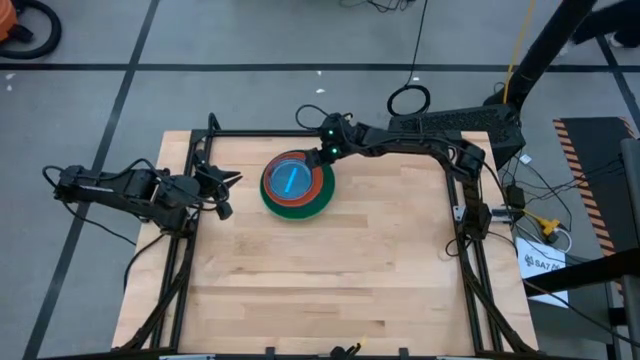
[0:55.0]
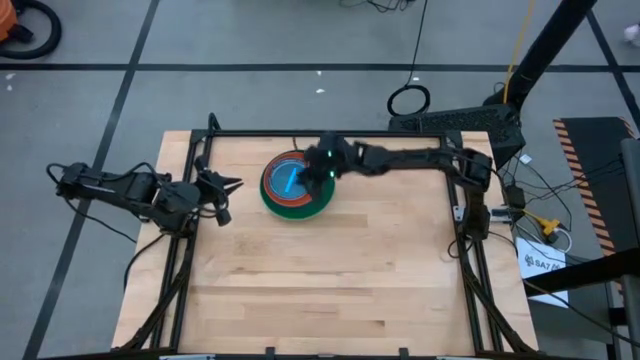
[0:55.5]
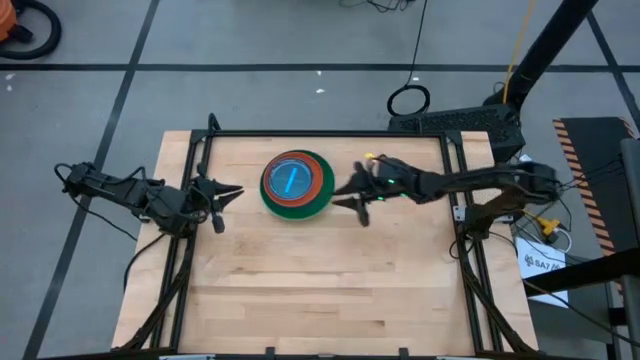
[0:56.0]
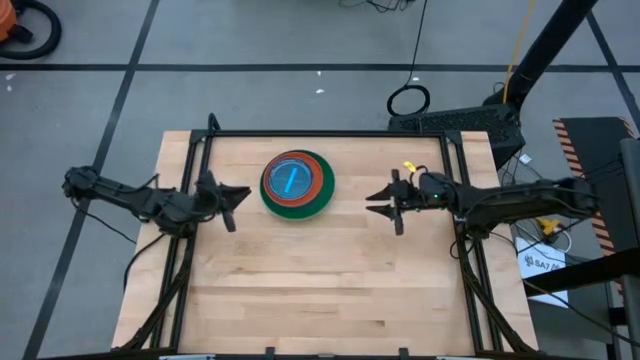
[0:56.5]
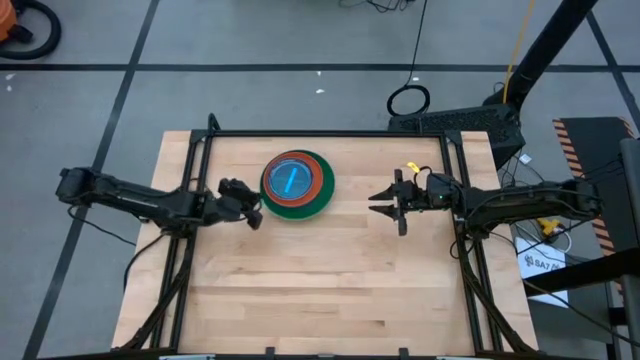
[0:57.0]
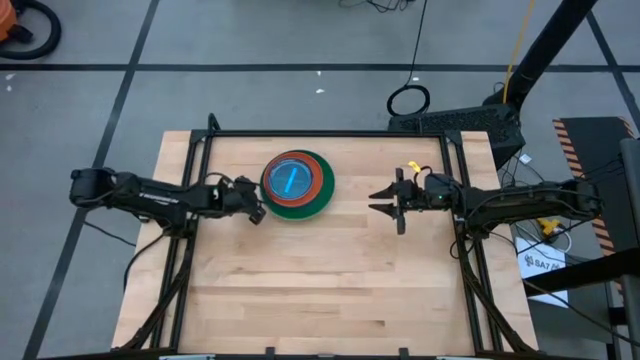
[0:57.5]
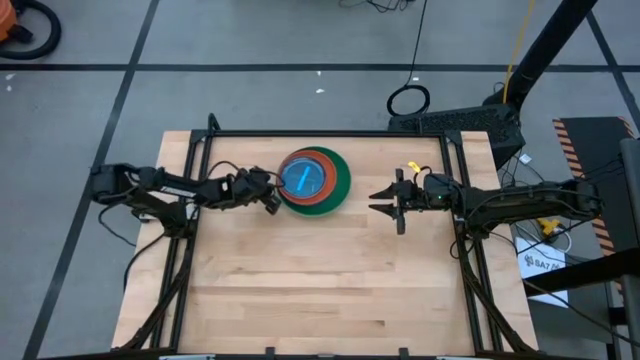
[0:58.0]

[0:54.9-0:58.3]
Task: Stack plastic plates
Adjust the stacked plates

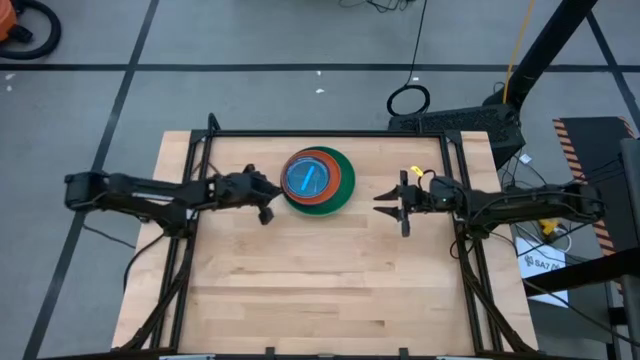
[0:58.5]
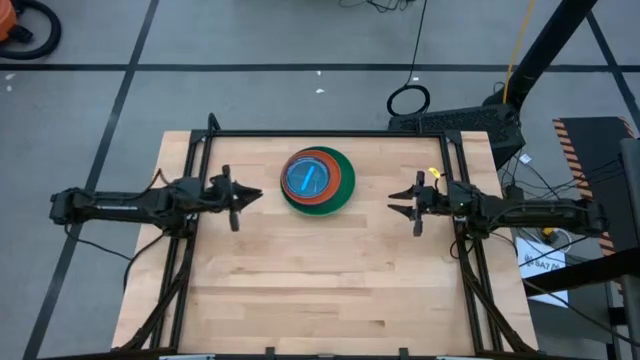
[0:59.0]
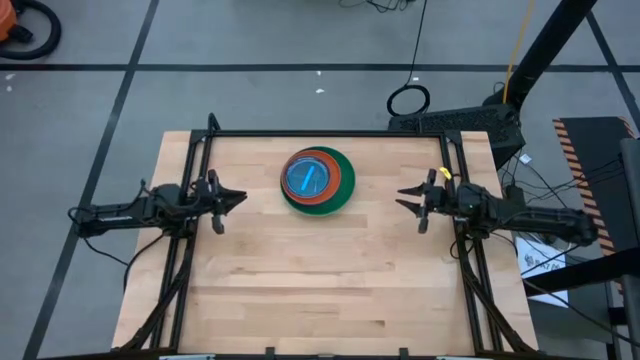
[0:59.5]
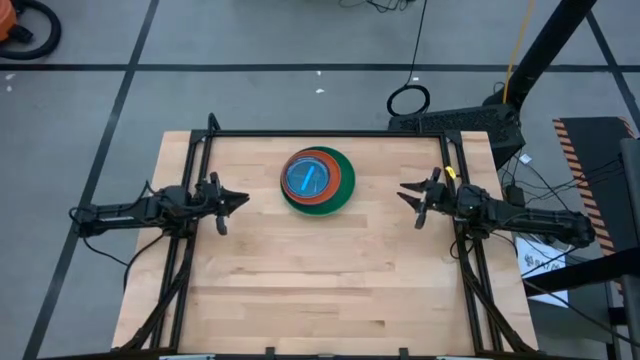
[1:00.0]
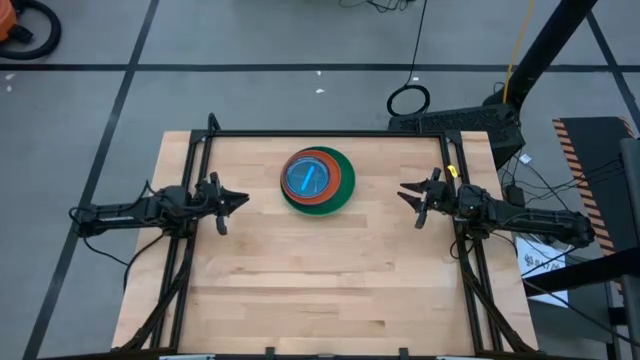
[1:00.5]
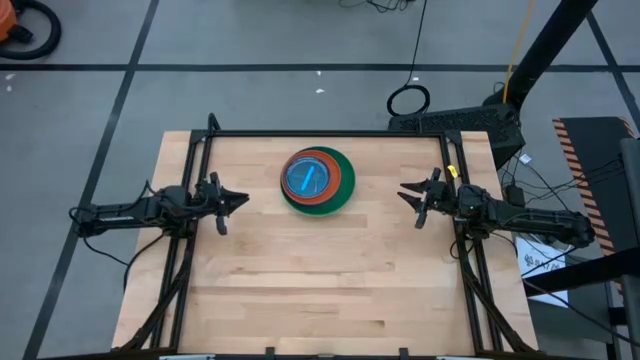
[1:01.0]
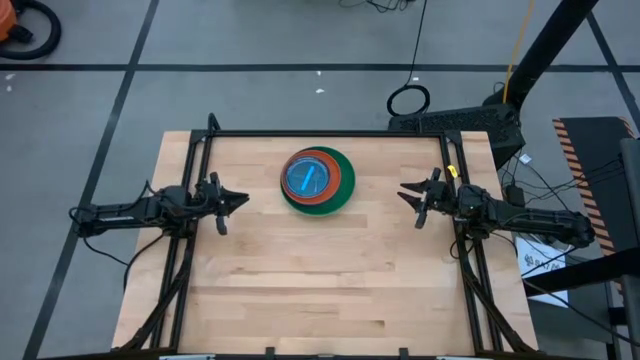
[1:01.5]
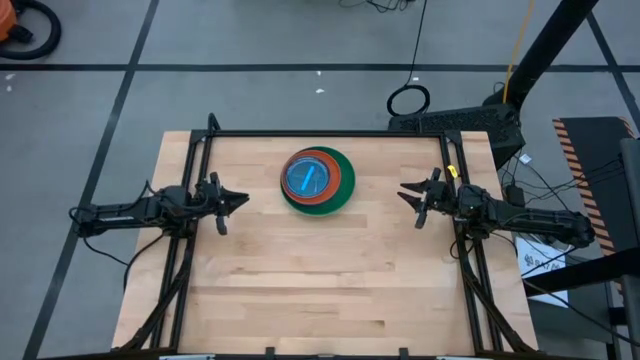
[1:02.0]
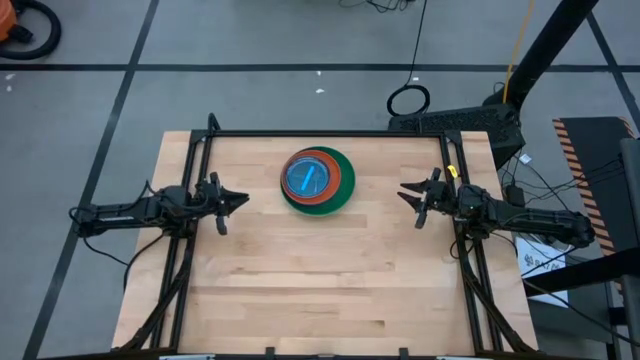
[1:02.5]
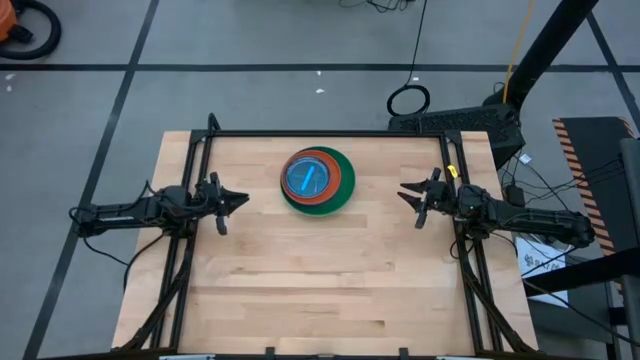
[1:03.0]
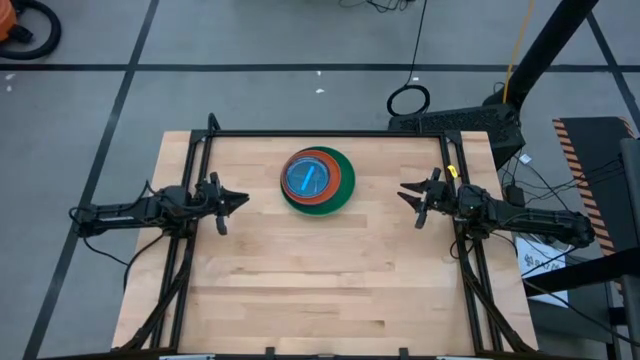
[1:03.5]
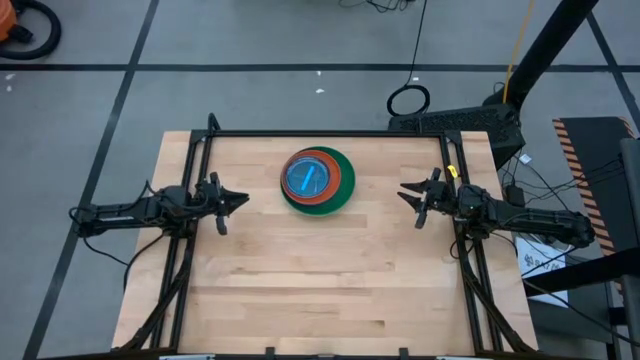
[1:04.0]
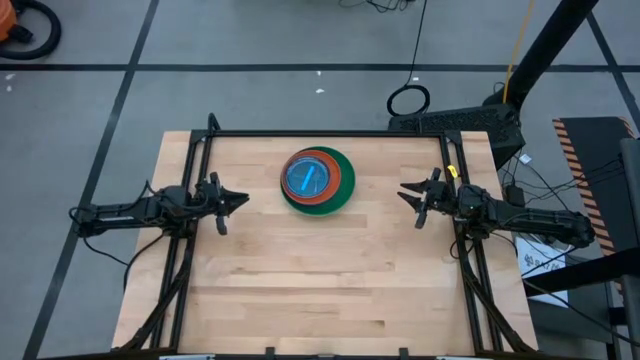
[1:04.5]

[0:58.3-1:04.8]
Return to Home Position

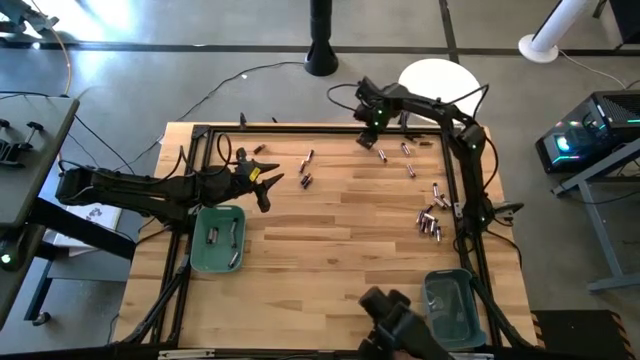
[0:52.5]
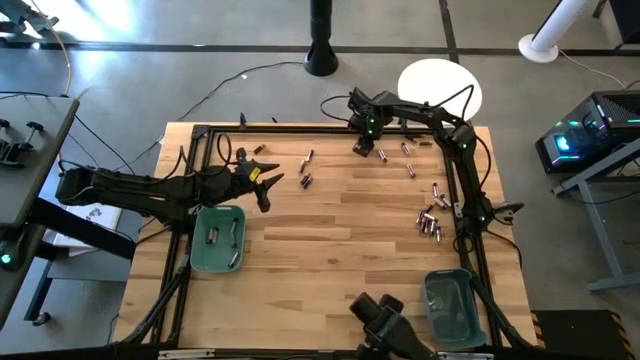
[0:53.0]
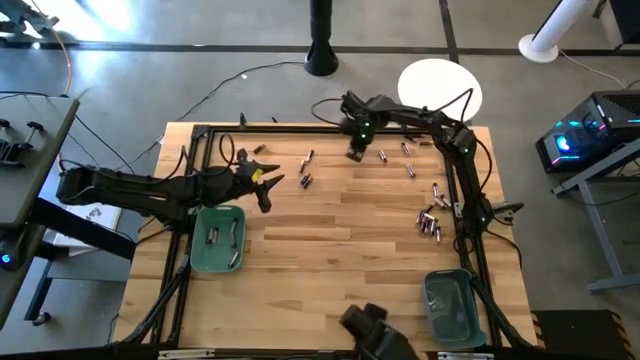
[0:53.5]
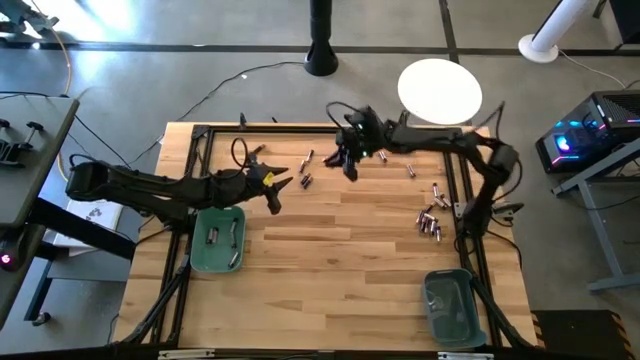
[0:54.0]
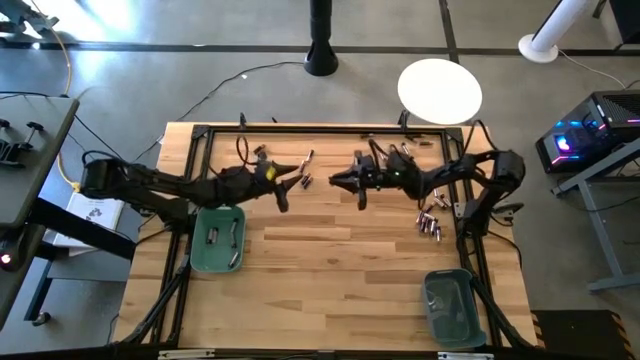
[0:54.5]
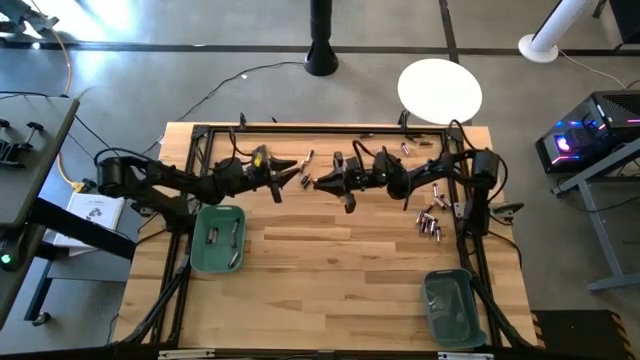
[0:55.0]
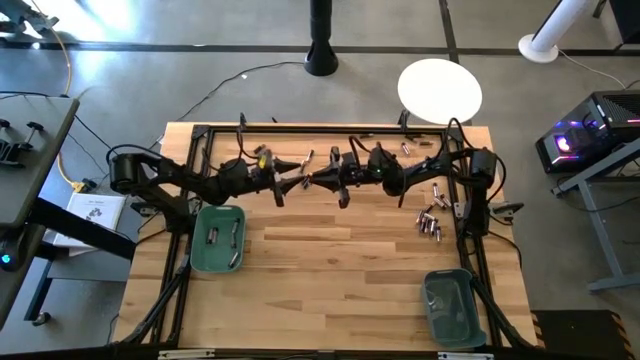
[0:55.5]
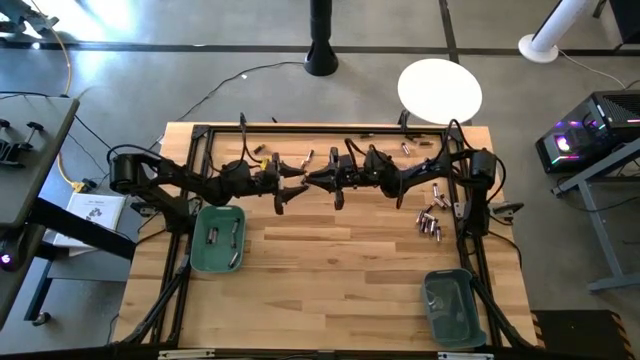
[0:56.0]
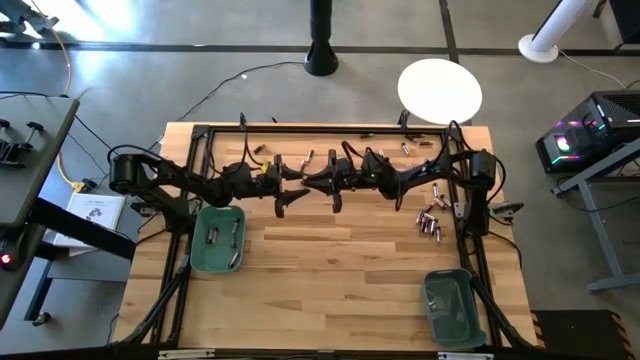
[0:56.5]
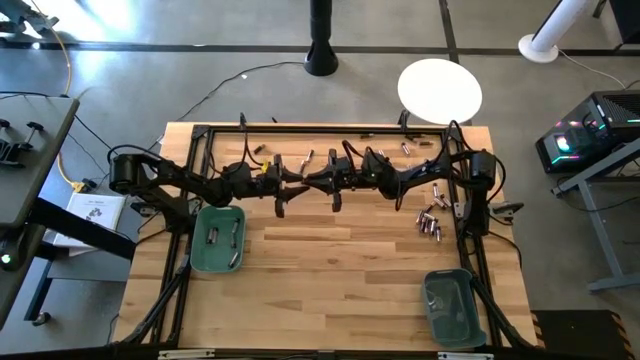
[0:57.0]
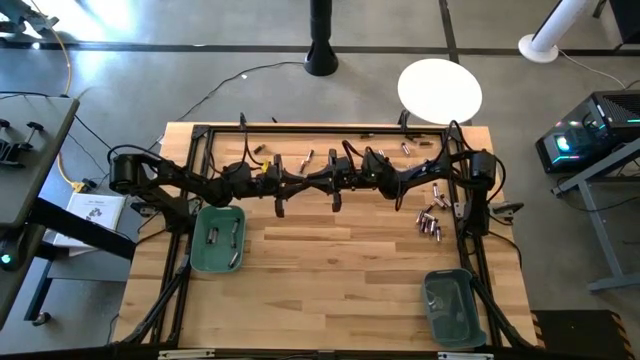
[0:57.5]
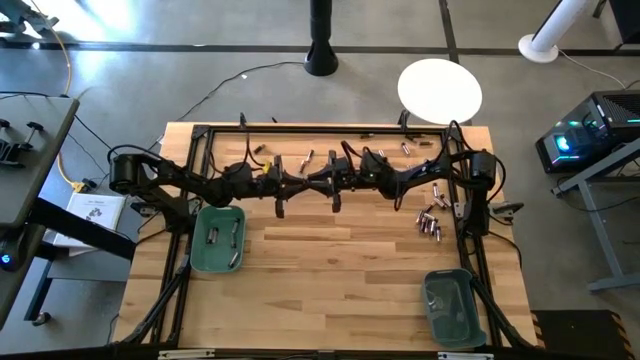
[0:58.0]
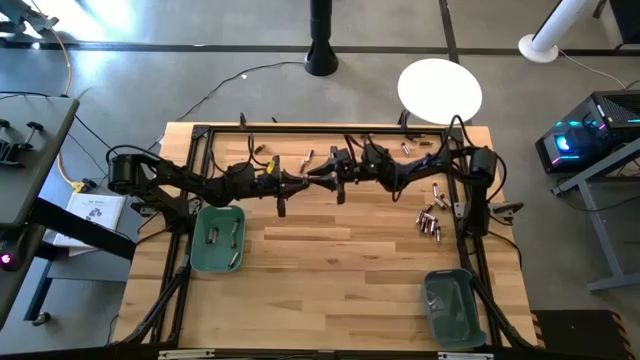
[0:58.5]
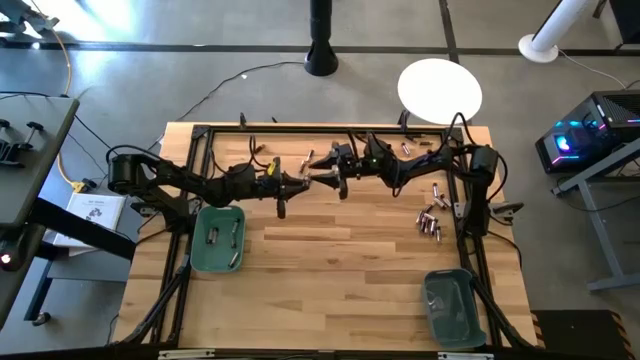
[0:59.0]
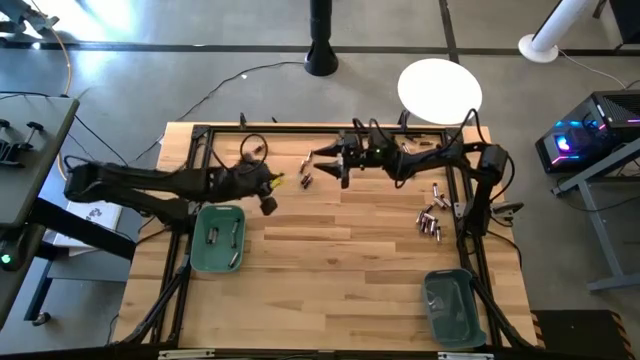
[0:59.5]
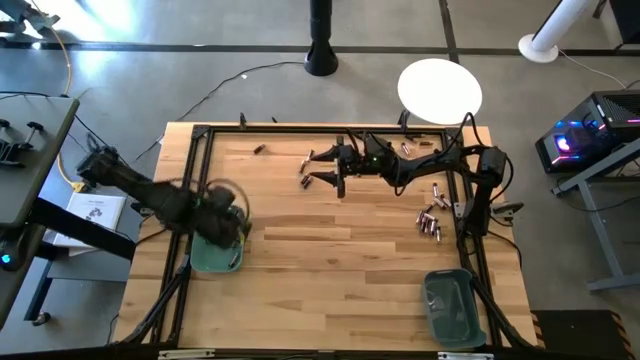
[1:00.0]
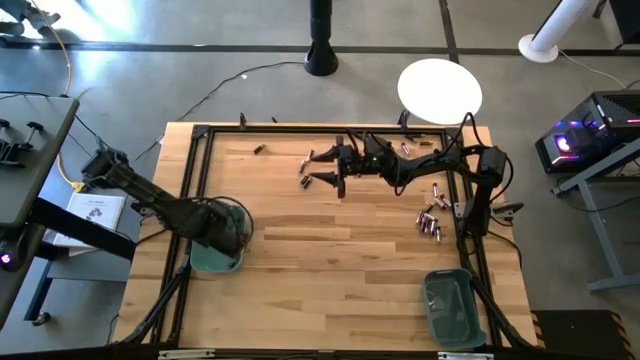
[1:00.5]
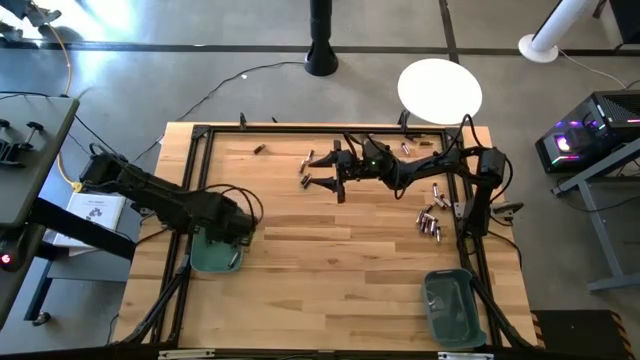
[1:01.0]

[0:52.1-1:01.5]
Task: Sort batteries
Put the silver battery into the green bin
